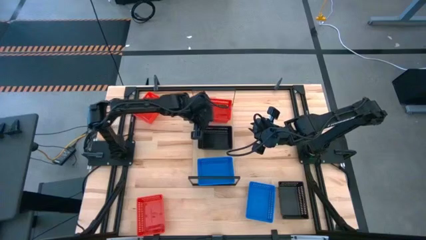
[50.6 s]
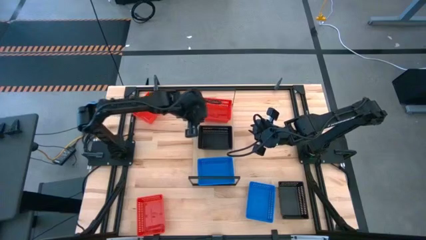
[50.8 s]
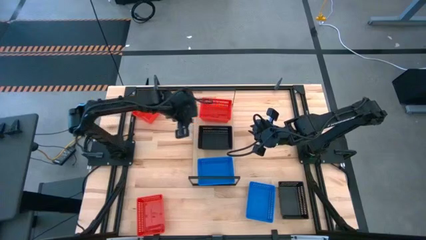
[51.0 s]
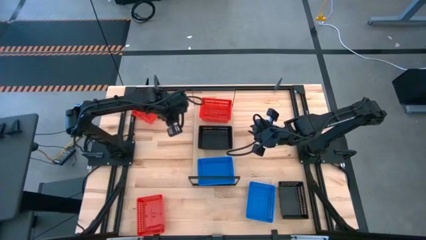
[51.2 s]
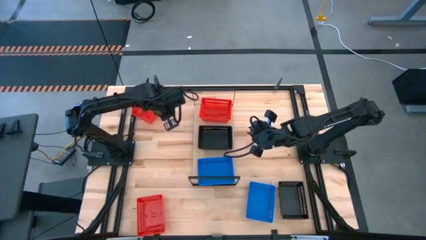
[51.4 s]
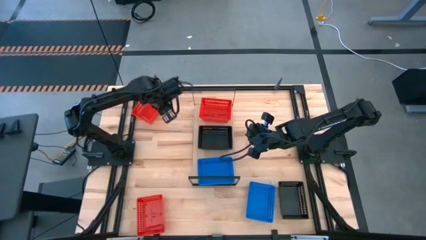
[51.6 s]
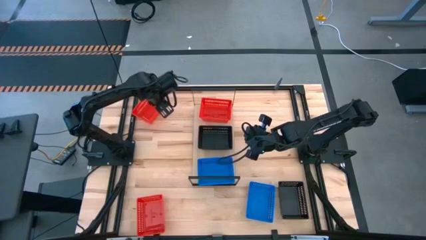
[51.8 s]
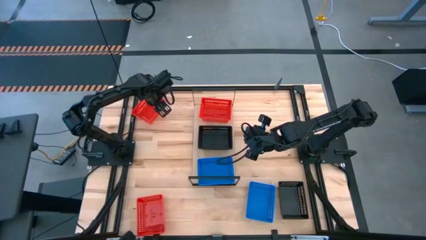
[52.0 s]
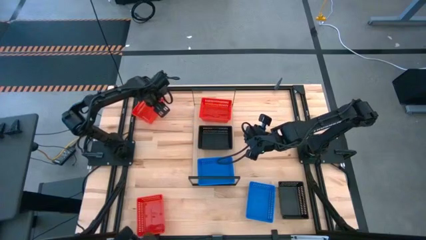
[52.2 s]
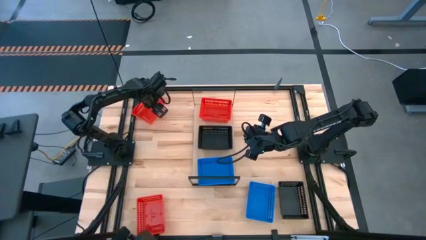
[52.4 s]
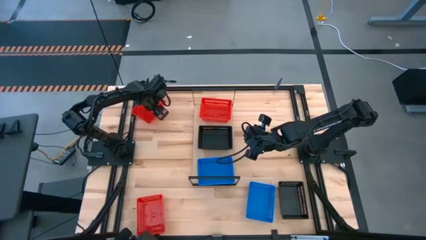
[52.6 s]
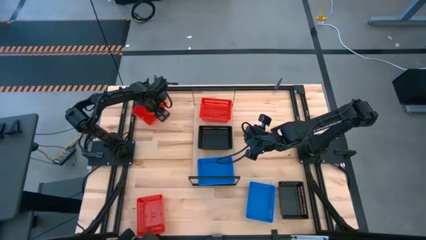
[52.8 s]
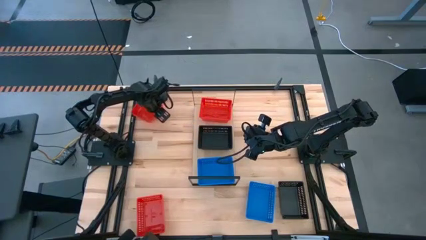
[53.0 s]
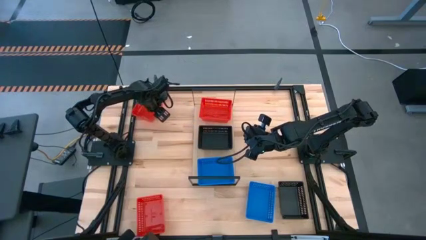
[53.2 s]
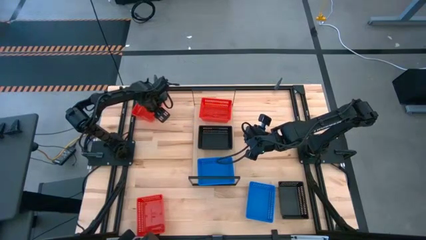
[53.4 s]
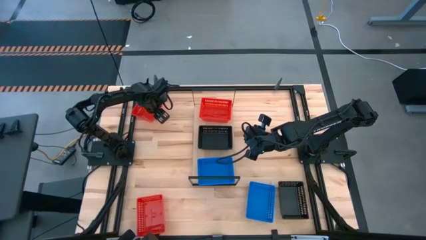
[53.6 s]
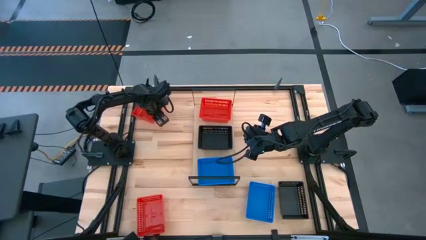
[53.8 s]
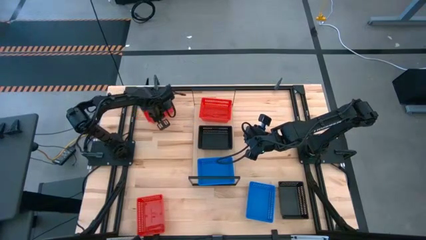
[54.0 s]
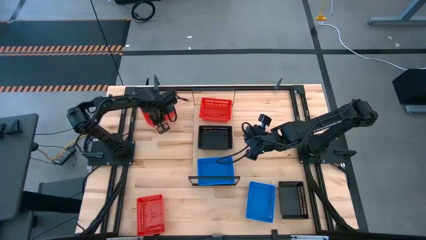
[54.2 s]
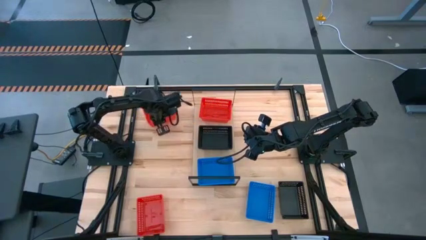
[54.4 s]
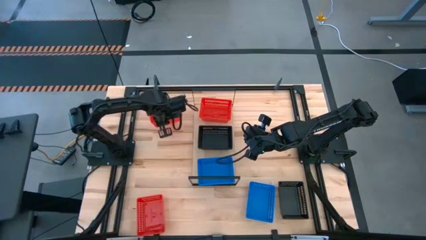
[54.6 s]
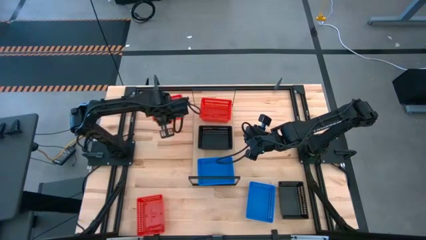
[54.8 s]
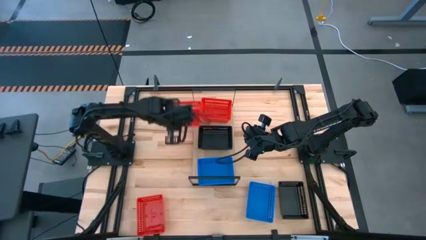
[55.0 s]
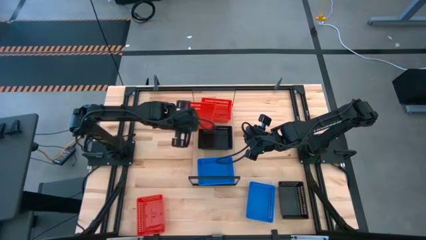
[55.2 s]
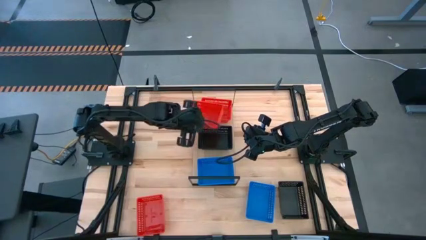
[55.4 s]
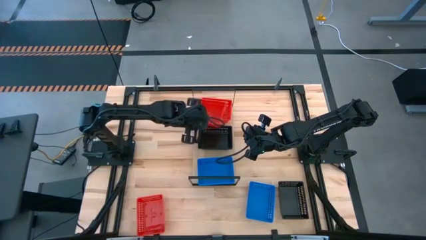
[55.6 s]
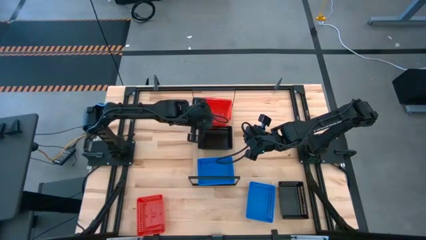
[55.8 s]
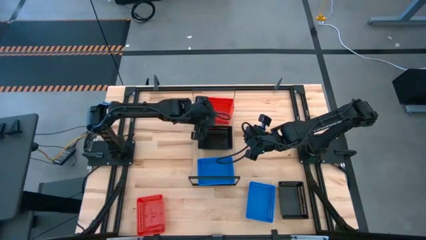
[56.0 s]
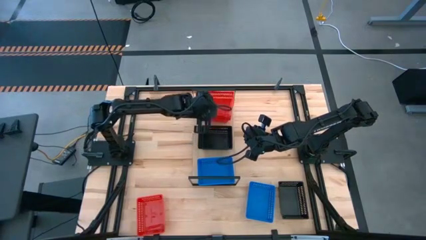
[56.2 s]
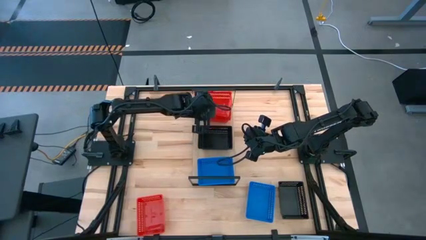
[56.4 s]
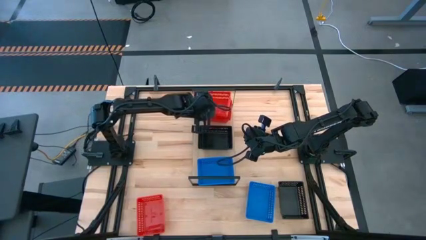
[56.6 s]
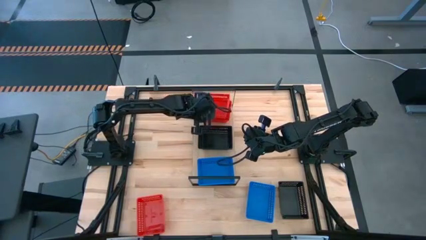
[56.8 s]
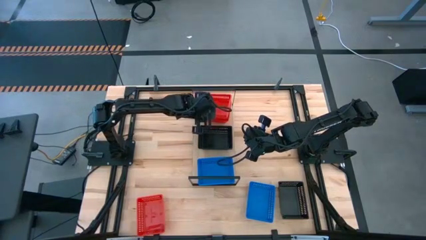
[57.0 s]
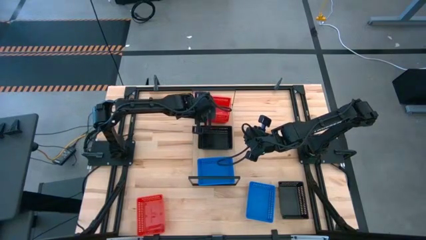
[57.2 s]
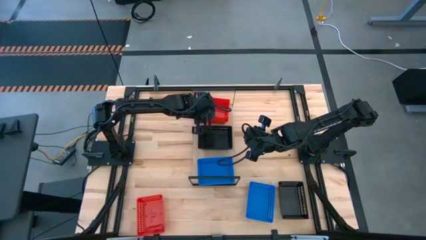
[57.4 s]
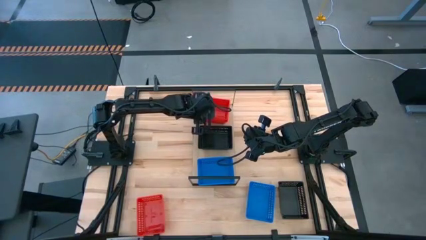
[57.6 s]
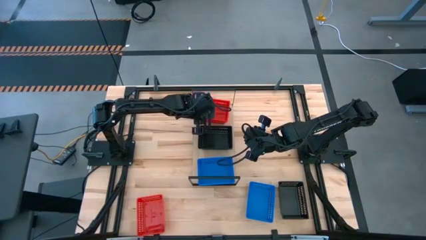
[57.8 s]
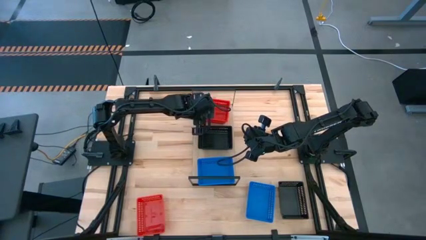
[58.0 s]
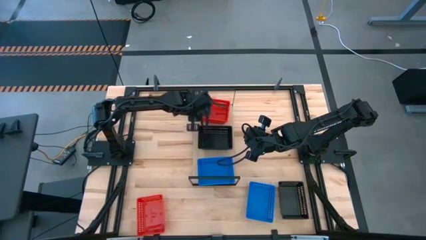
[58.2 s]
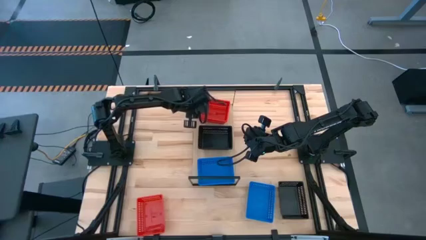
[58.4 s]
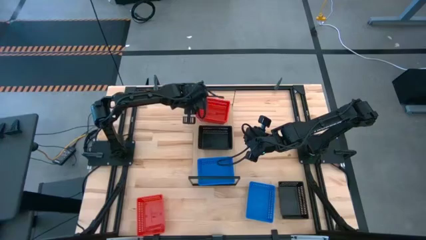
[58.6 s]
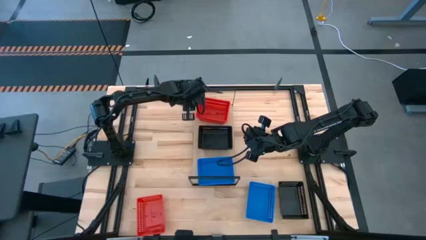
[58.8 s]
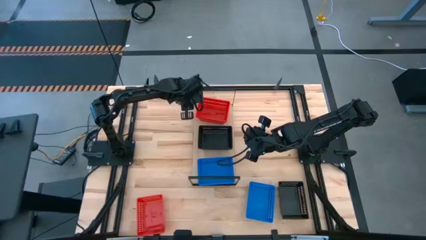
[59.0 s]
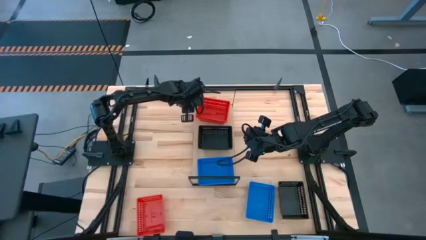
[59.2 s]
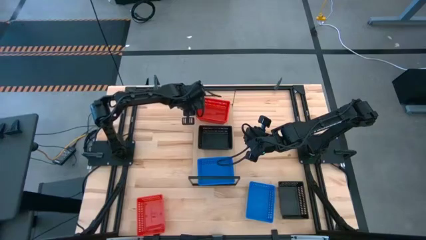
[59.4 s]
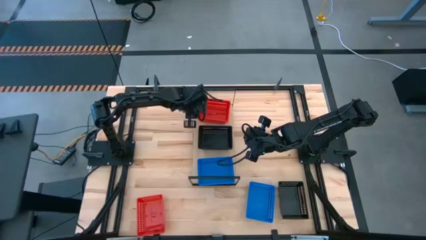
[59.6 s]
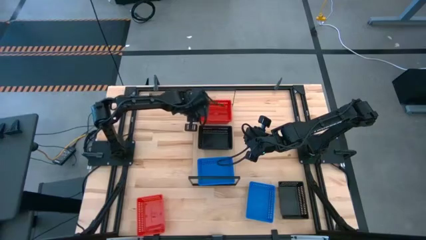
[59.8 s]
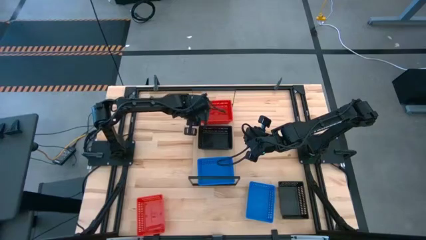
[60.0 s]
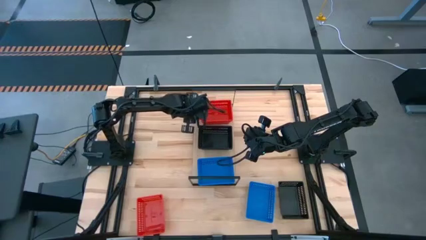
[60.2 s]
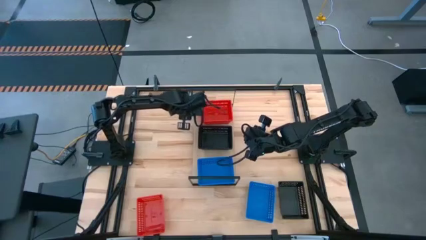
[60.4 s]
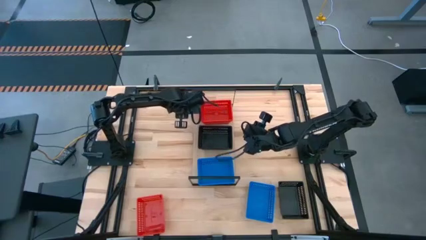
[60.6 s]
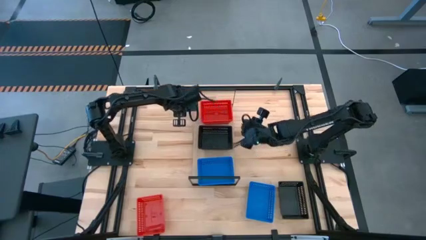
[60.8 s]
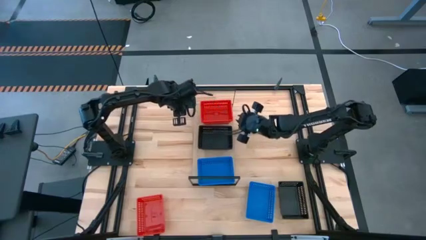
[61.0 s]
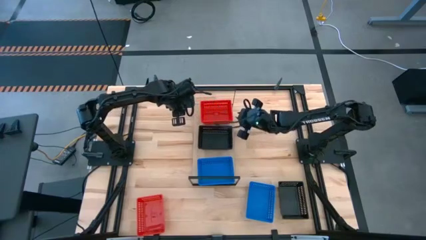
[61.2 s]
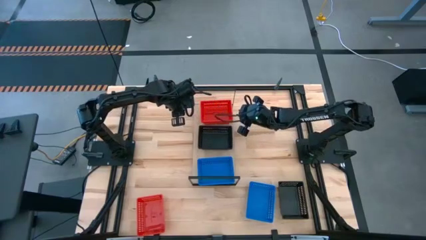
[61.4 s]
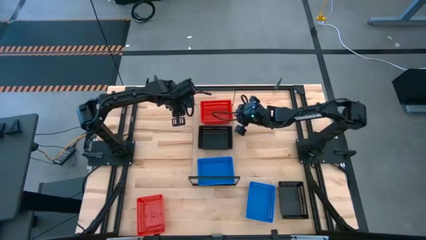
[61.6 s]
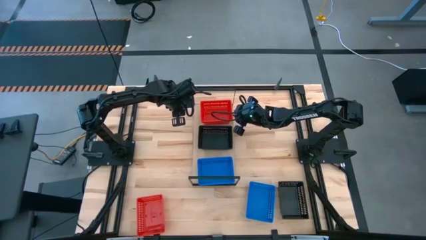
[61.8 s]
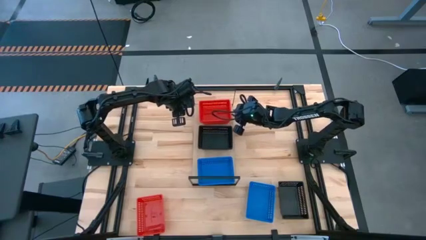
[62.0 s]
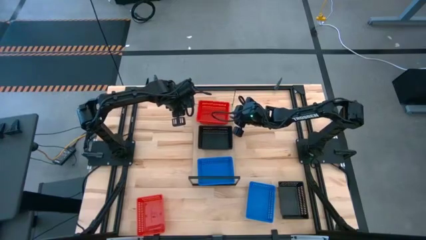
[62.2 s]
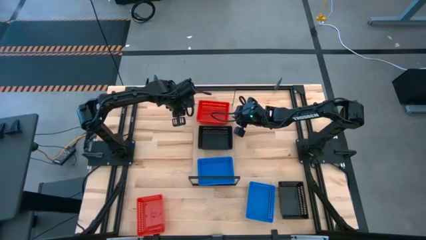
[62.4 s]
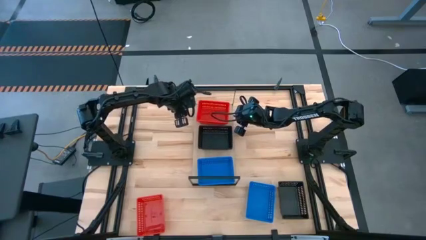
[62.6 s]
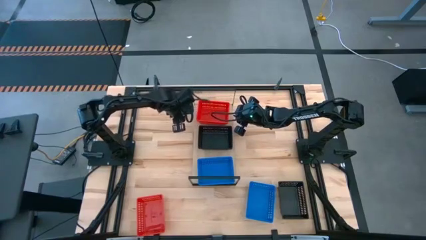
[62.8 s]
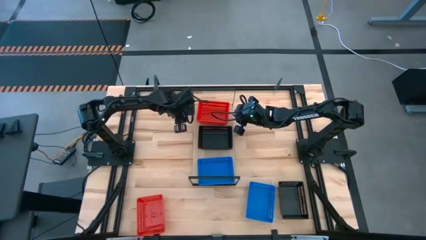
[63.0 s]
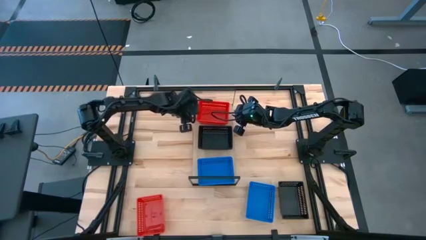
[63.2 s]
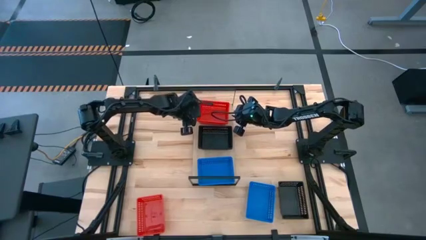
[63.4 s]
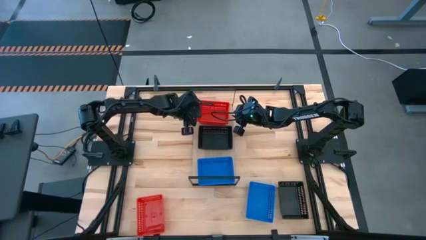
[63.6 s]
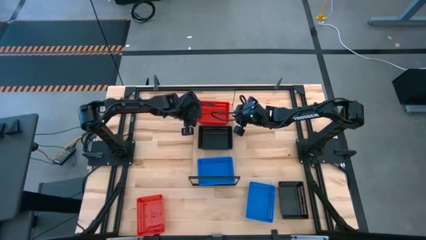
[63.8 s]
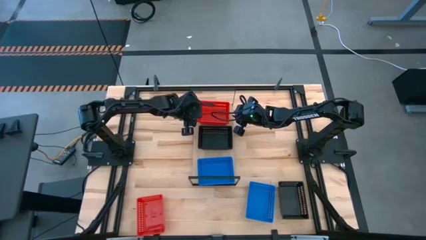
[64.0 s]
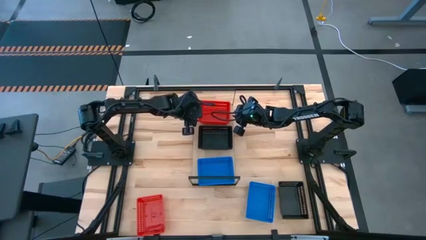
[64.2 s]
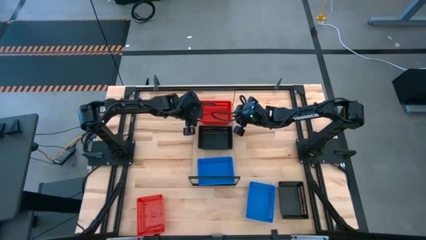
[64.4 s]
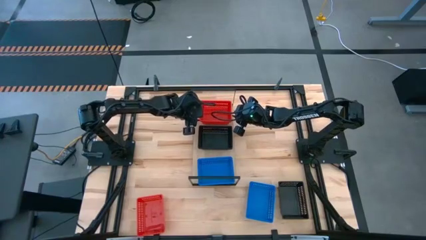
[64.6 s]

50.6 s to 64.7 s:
Task: Stack baskets on shelf by color
Stack the top red bin on top of the red bin on the shelf
